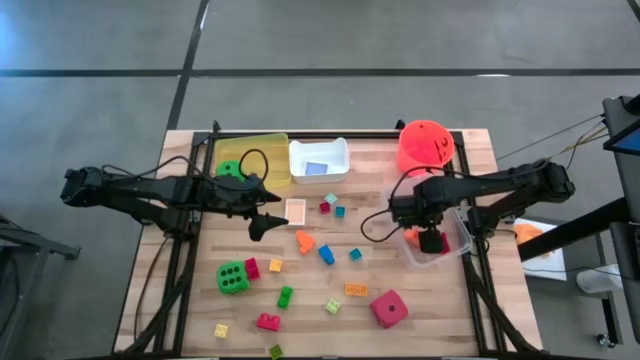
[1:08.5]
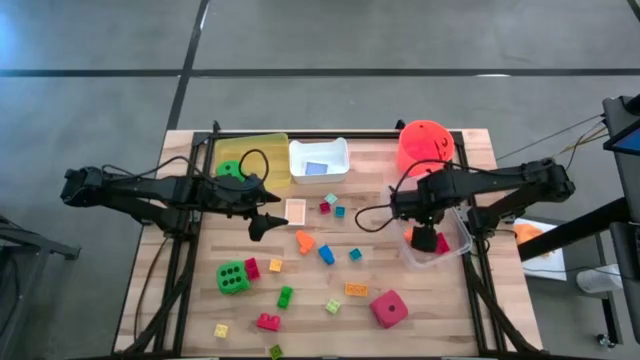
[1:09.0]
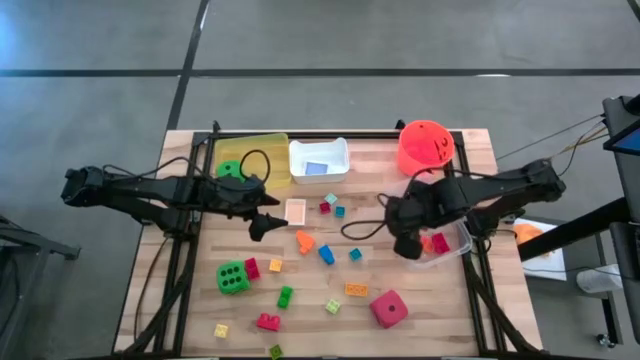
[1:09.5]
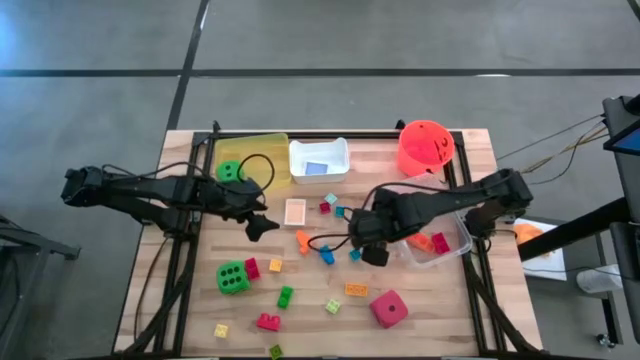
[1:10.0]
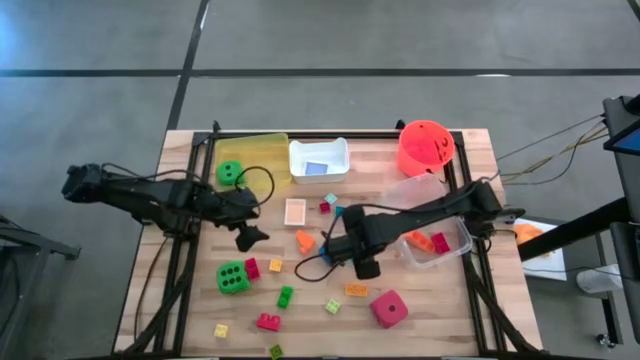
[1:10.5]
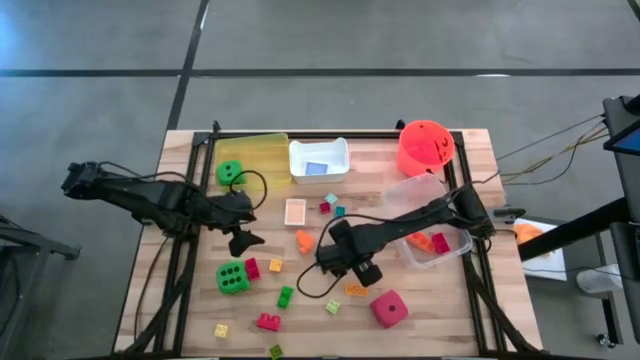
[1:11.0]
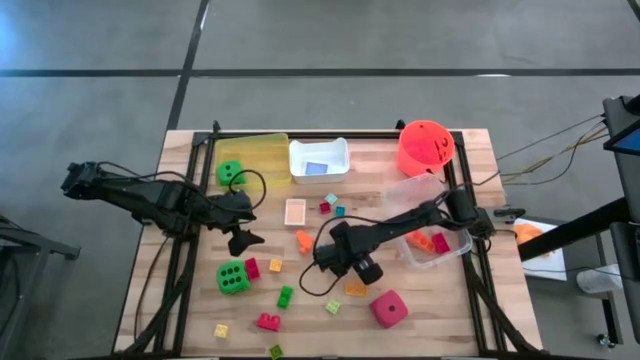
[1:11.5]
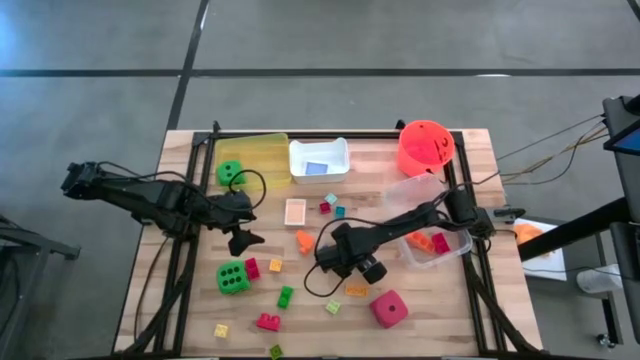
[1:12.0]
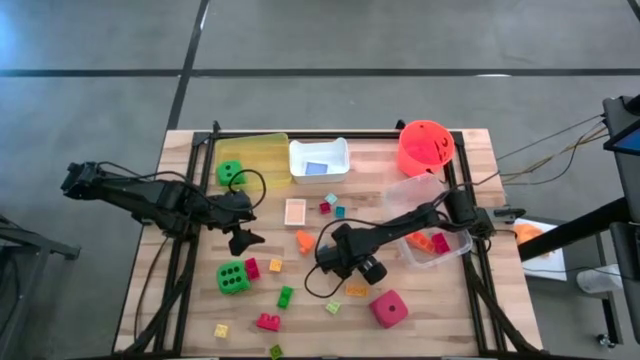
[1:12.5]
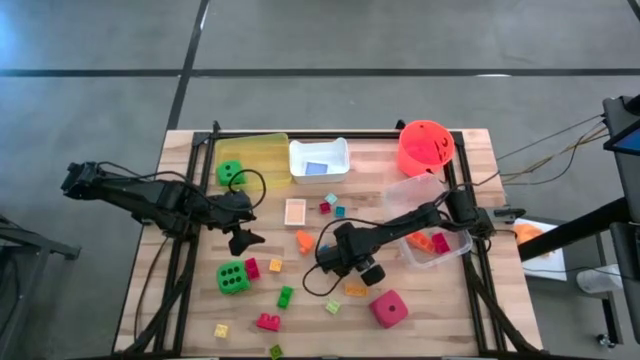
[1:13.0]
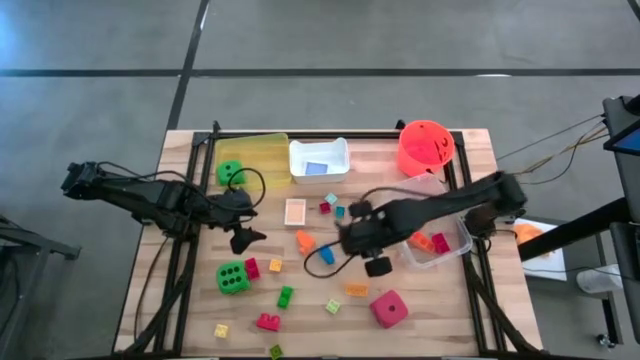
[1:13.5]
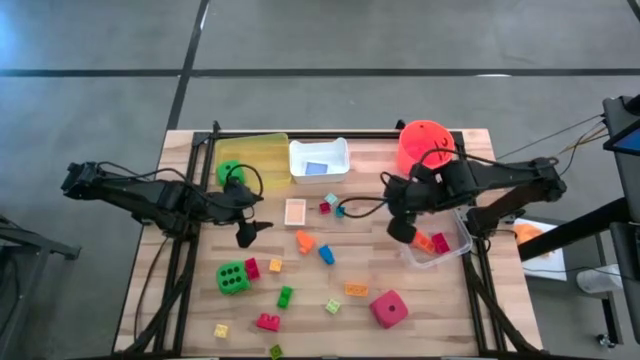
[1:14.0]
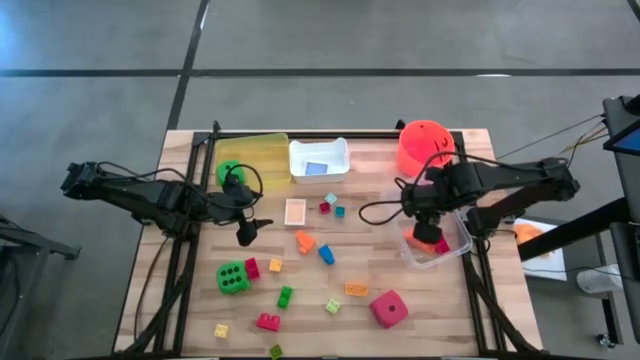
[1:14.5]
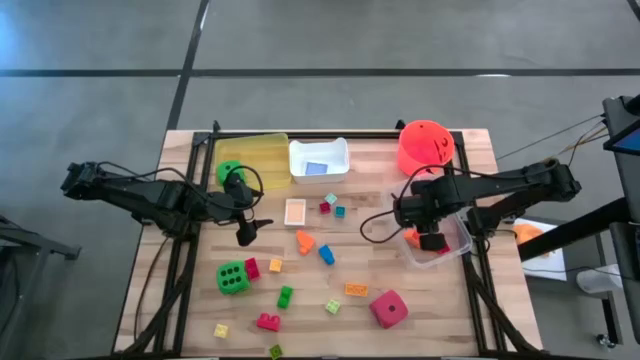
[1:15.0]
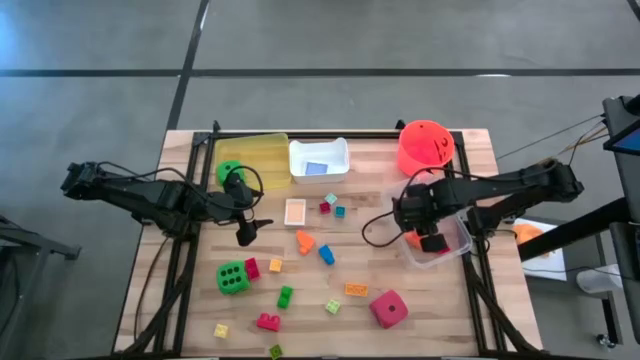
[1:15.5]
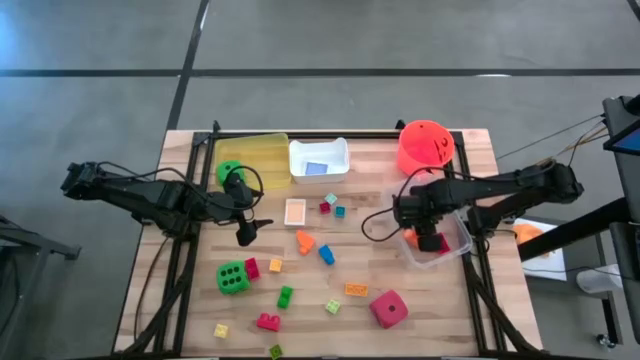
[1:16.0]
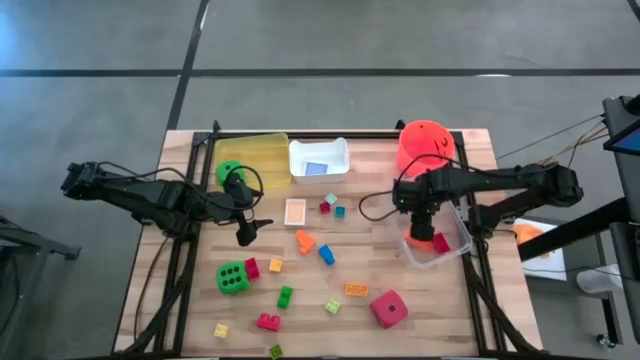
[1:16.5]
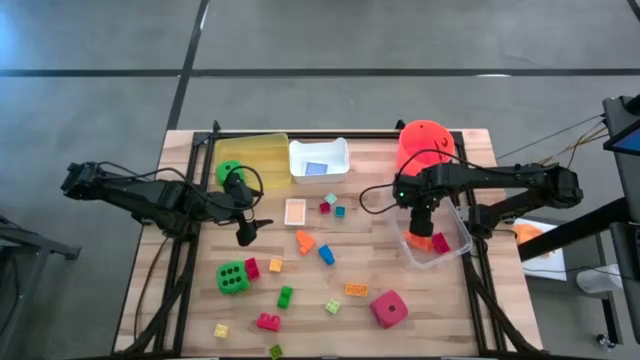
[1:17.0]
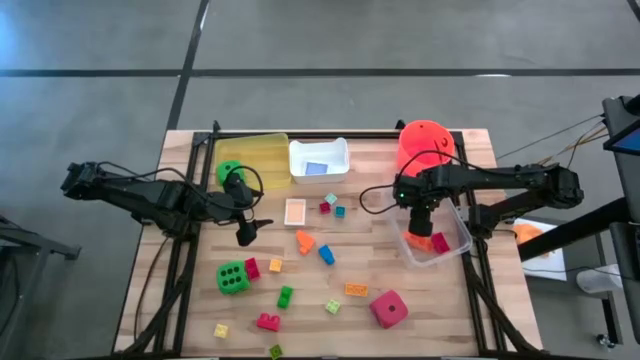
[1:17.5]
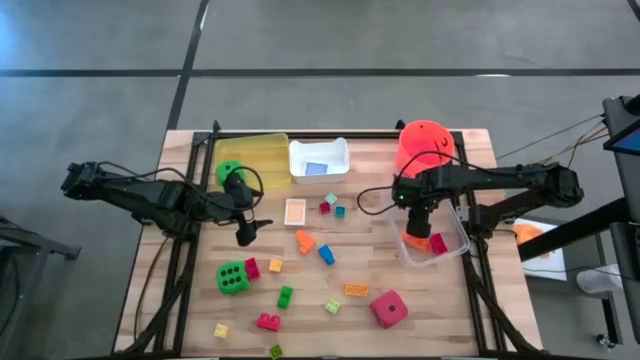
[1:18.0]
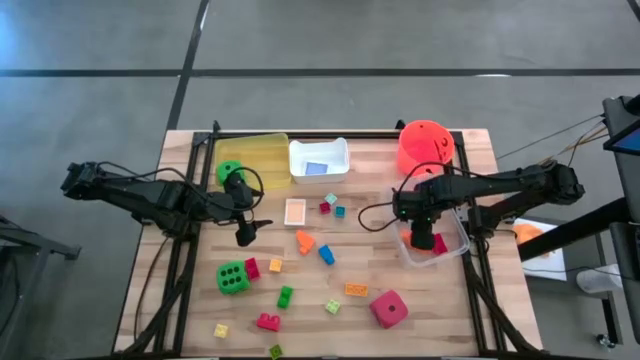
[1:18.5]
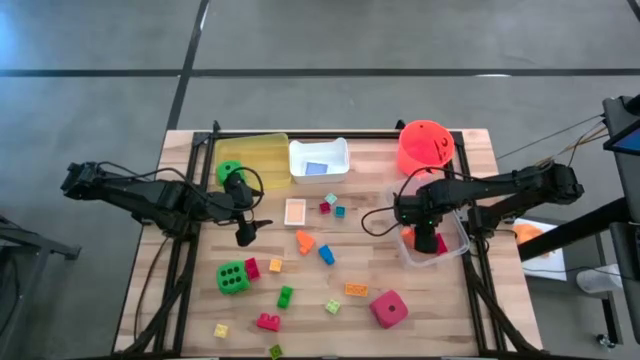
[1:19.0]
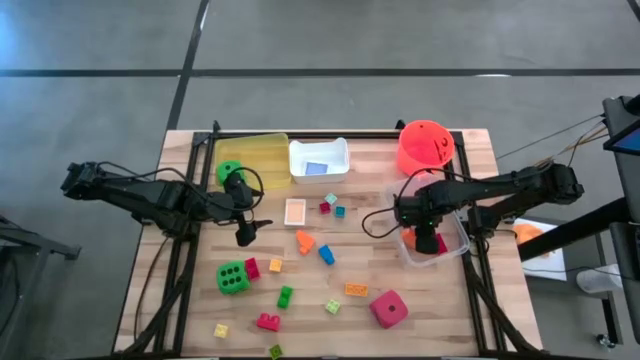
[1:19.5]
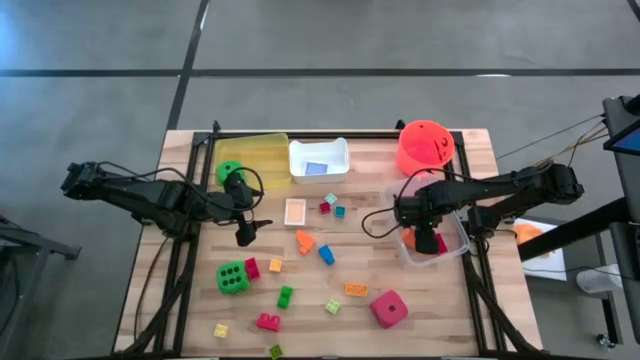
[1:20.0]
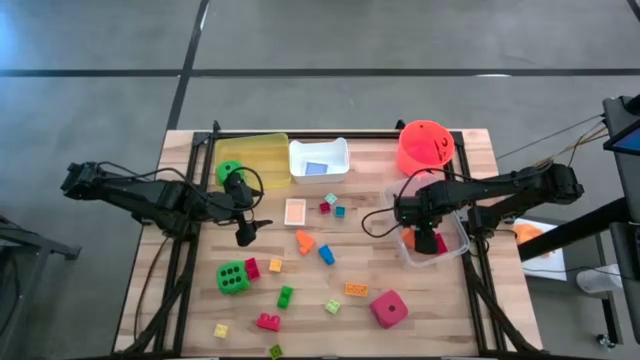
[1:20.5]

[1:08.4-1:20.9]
Task: Pick & Place Toys
Put the blue game piece into the transparent bin

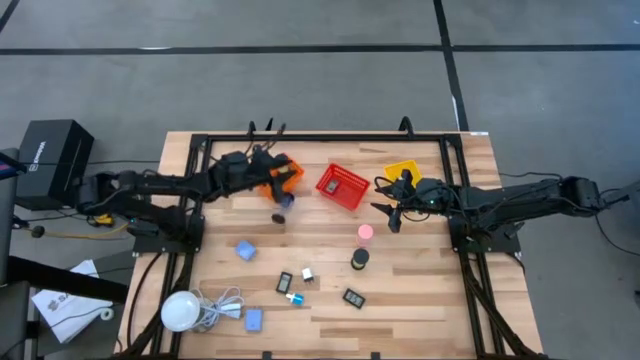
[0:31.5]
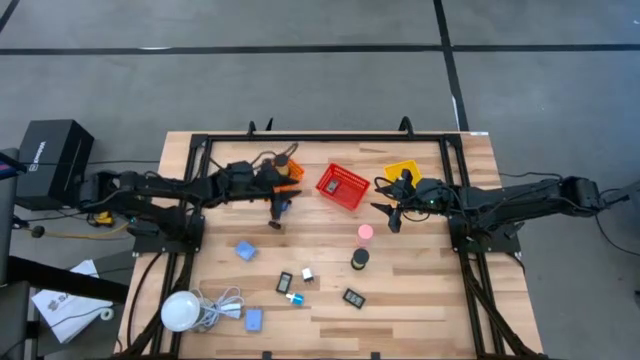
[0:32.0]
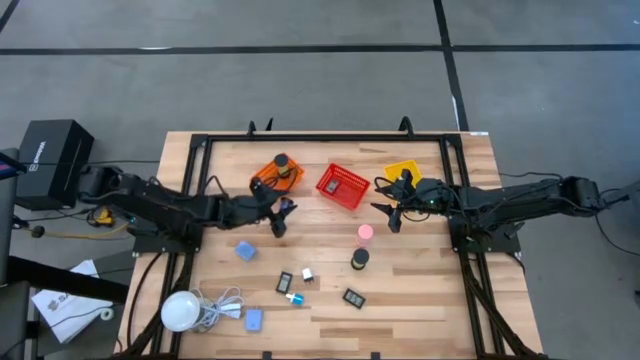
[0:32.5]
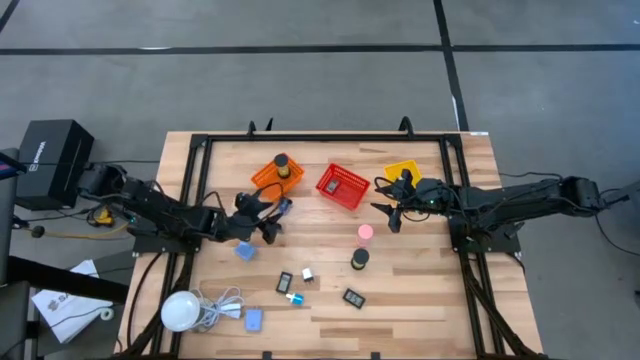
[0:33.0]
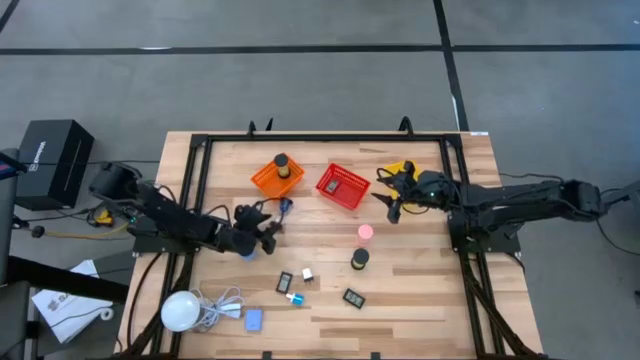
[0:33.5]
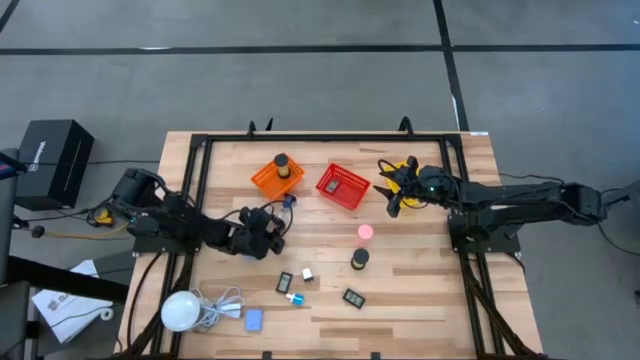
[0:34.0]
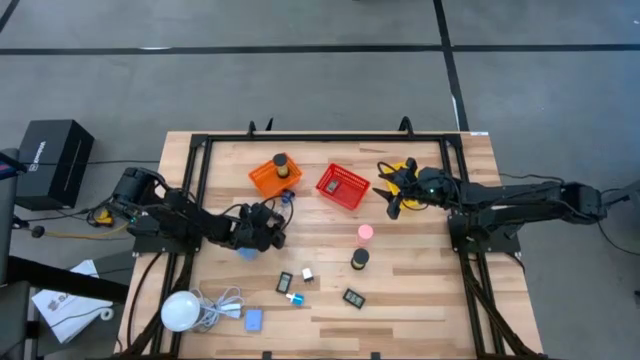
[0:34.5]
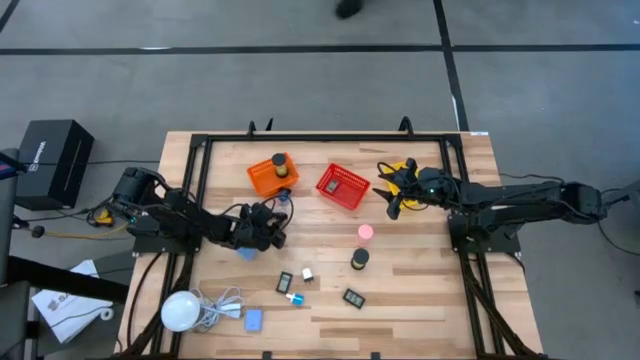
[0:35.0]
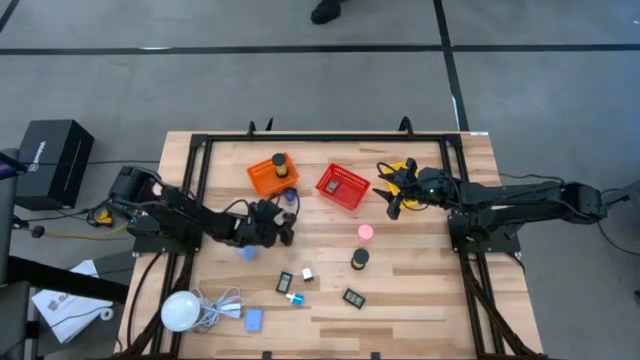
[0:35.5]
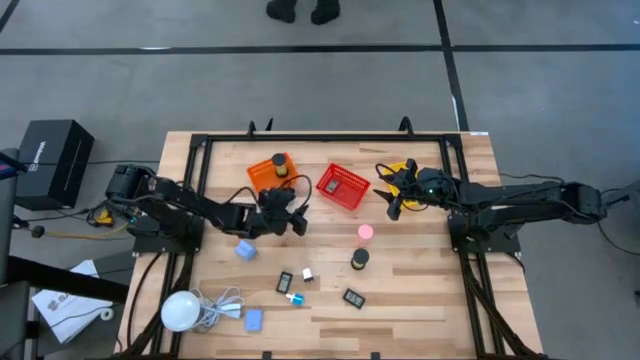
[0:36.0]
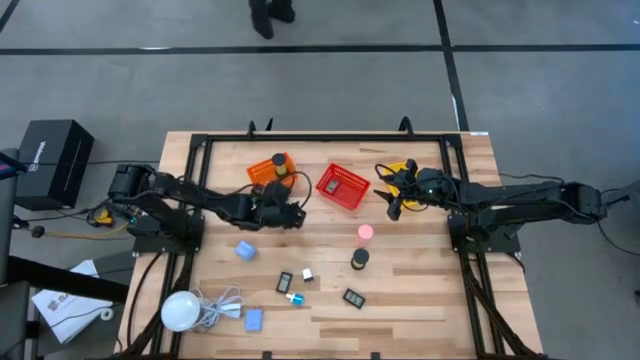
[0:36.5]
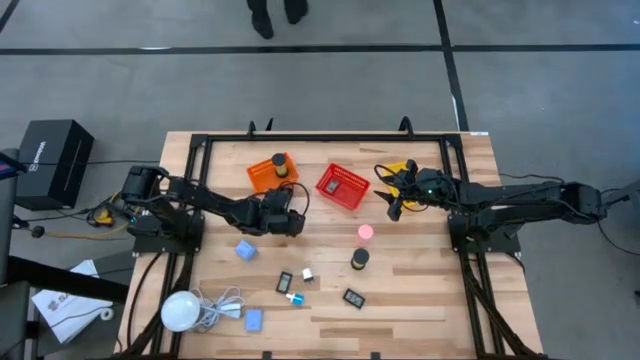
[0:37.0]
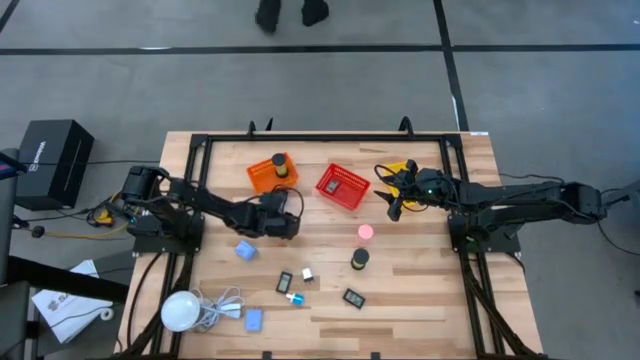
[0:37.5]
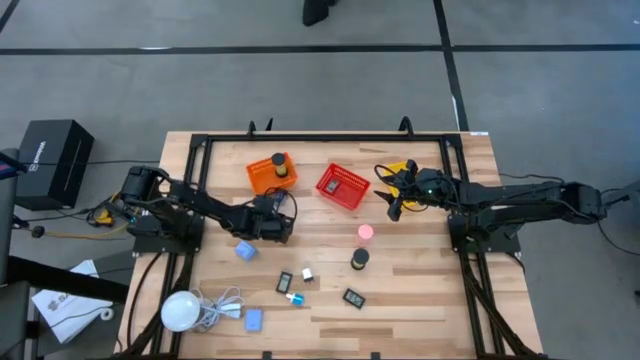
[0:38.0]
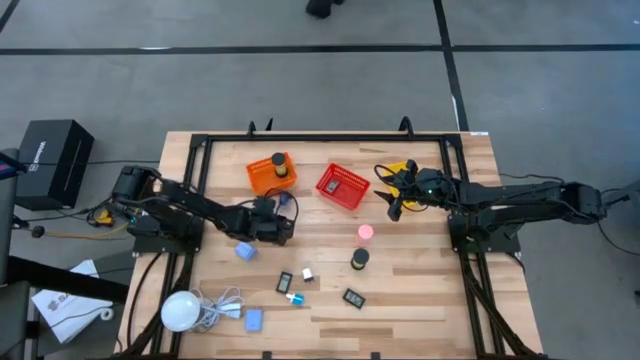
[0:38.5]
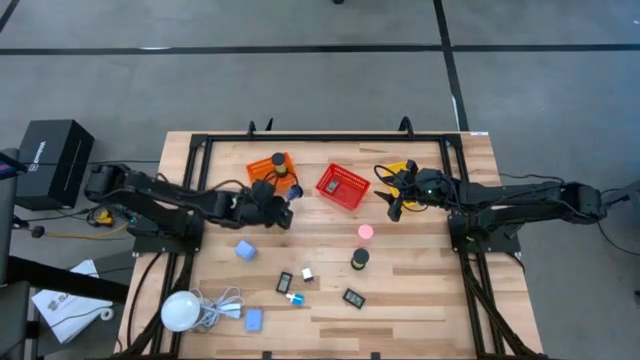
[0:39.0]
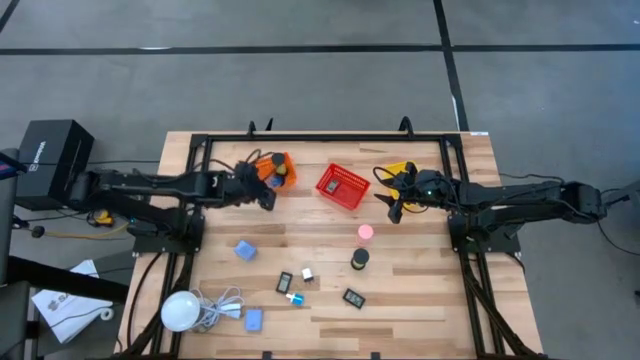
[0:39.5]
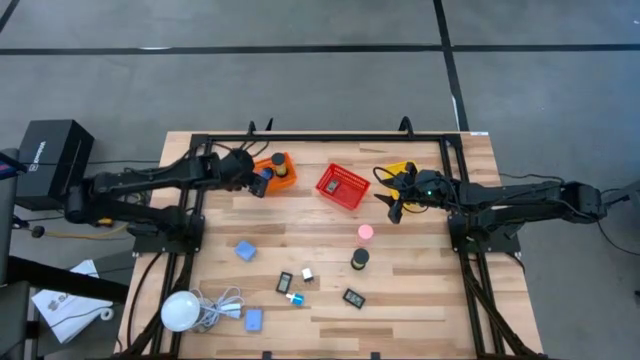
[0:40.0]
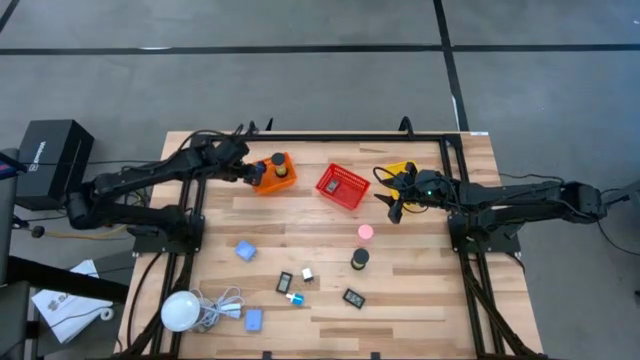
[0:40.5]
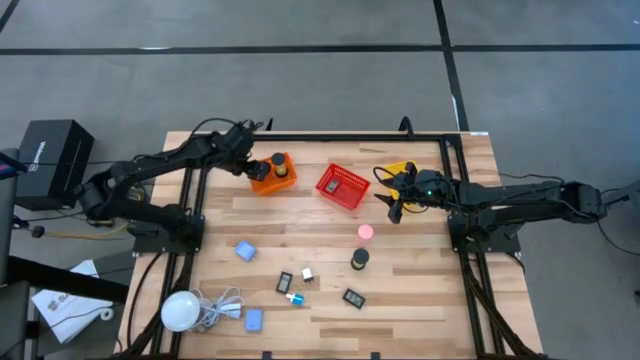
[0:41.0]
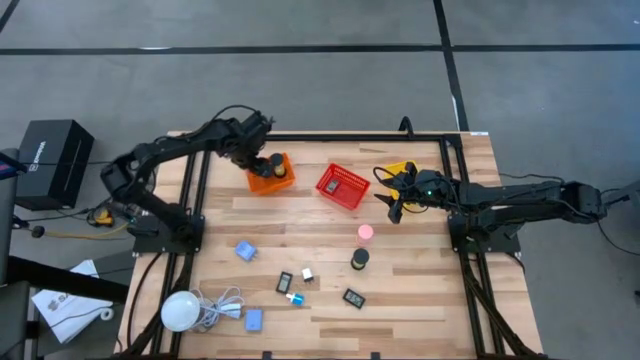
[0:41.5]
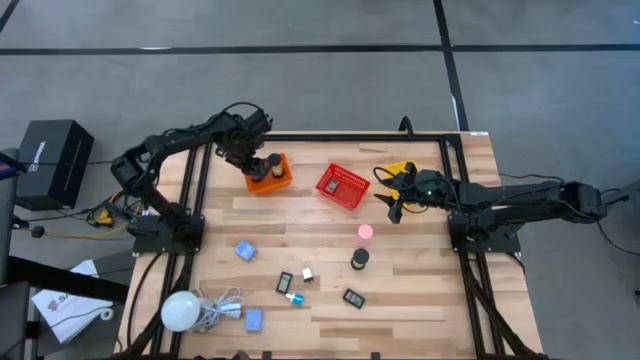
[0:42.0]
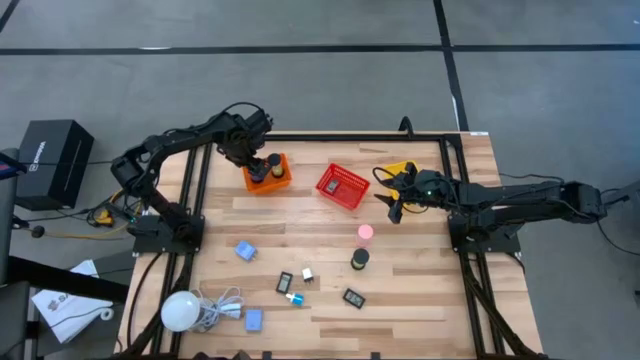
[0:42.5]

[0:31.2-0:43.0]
Task: Pick & Place Office items
Put the blue hourglass into the orange bin
